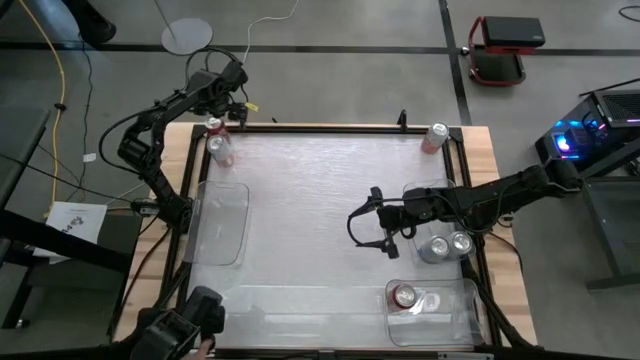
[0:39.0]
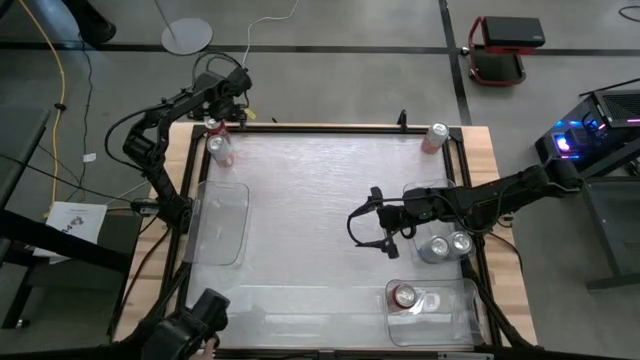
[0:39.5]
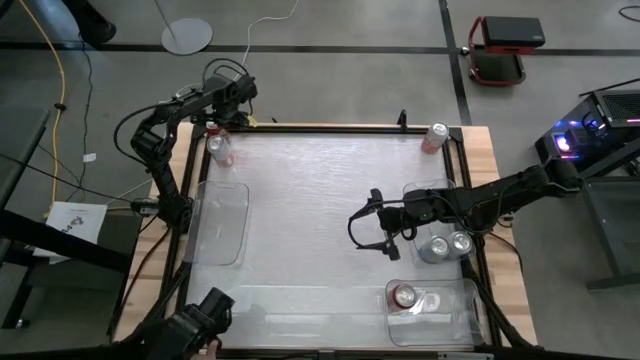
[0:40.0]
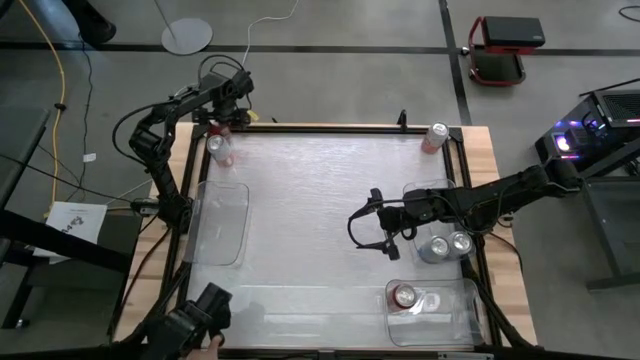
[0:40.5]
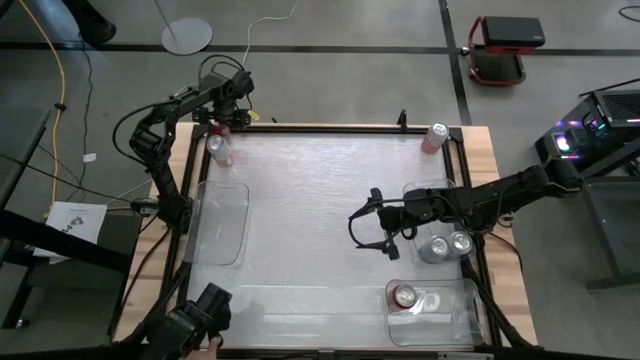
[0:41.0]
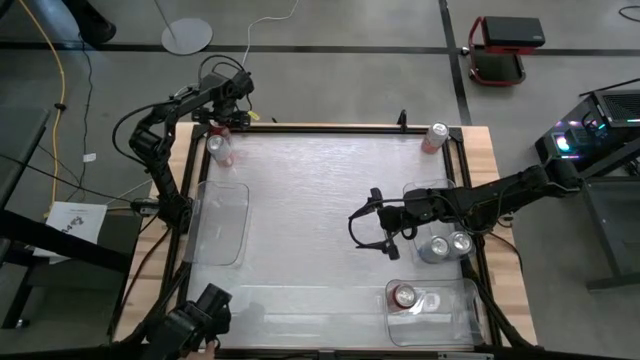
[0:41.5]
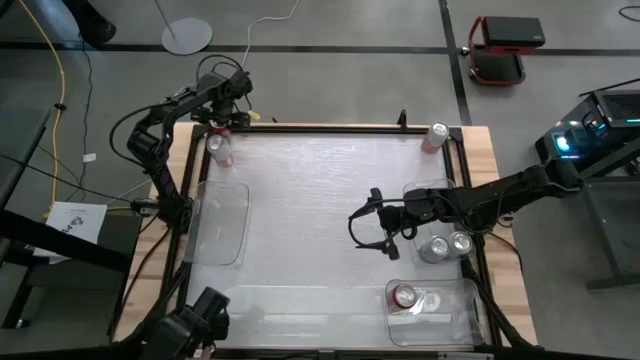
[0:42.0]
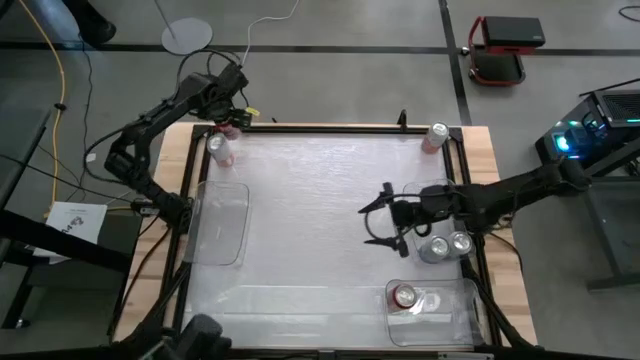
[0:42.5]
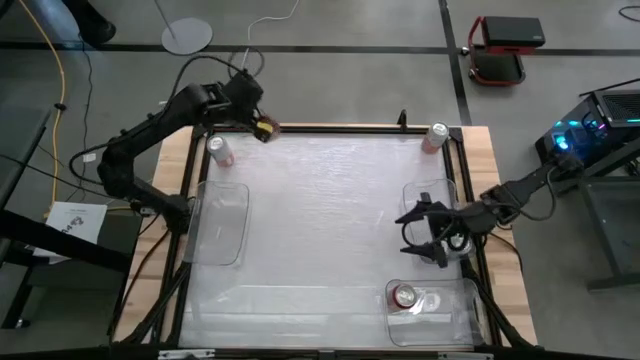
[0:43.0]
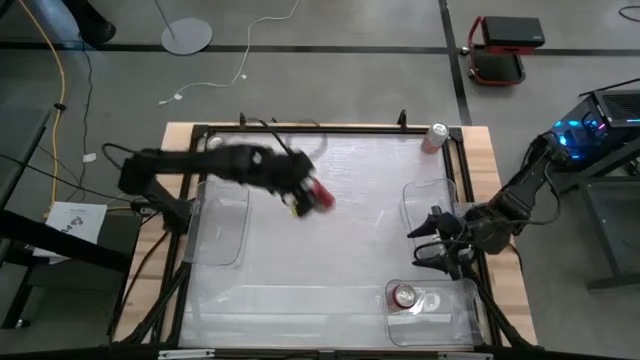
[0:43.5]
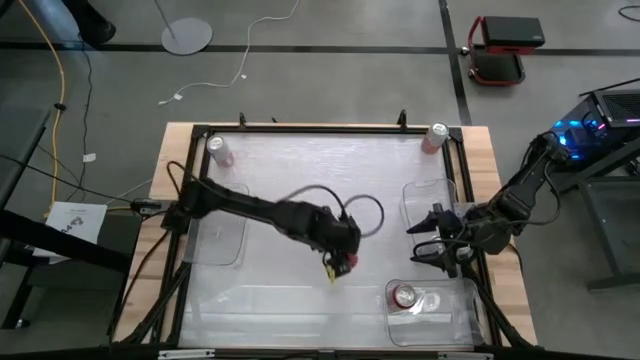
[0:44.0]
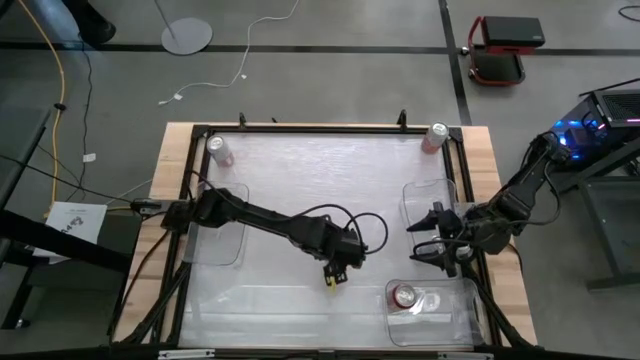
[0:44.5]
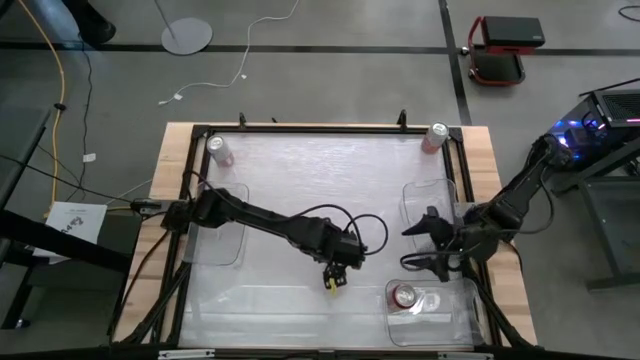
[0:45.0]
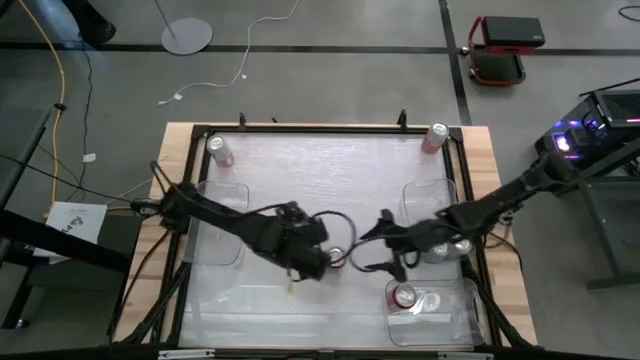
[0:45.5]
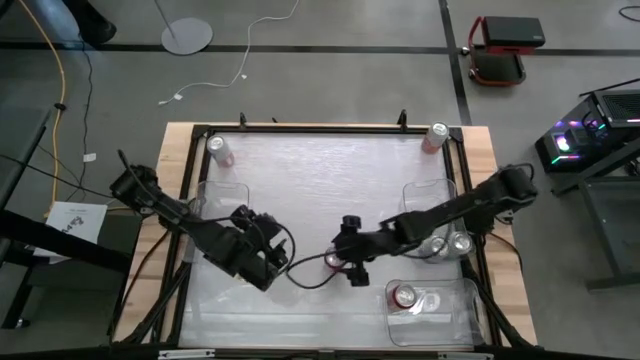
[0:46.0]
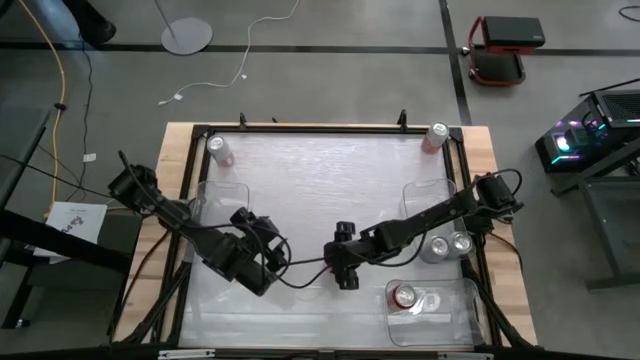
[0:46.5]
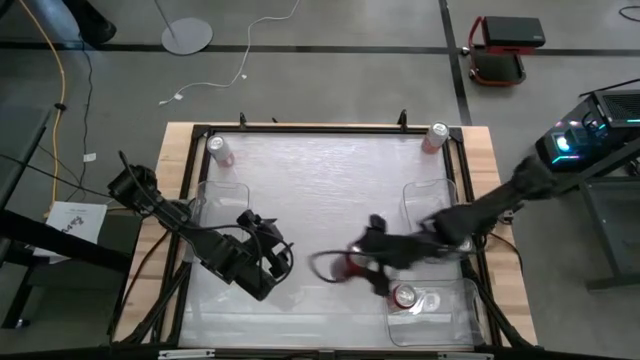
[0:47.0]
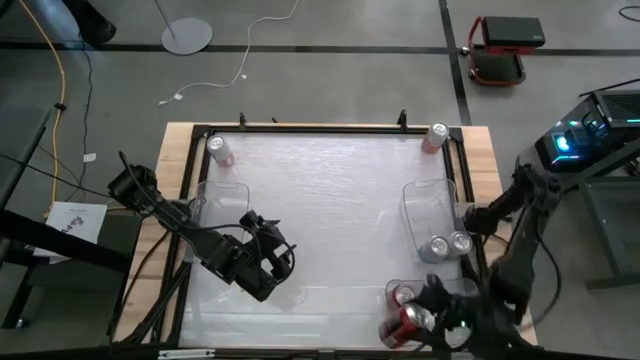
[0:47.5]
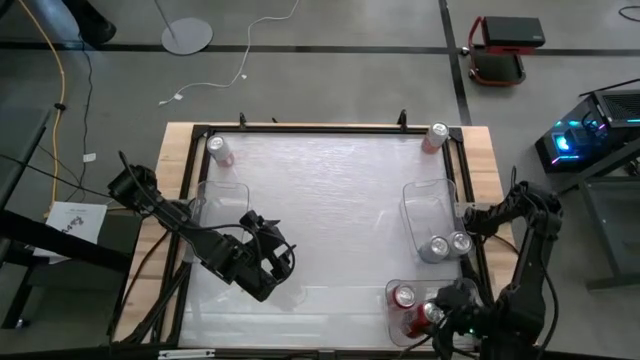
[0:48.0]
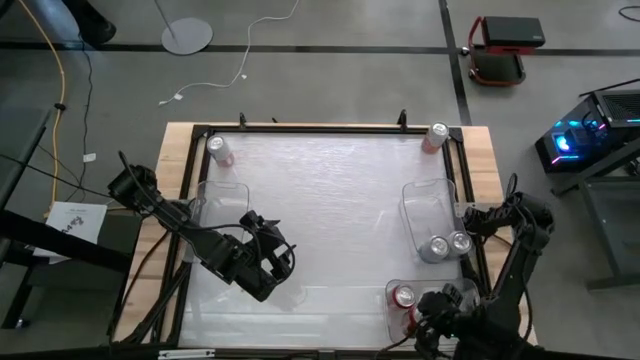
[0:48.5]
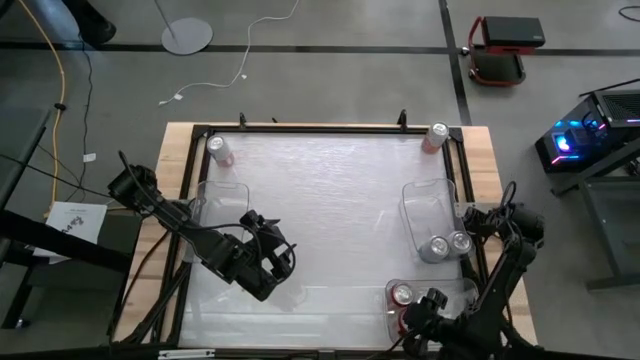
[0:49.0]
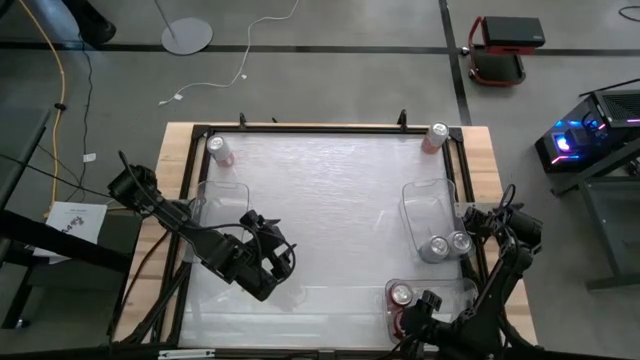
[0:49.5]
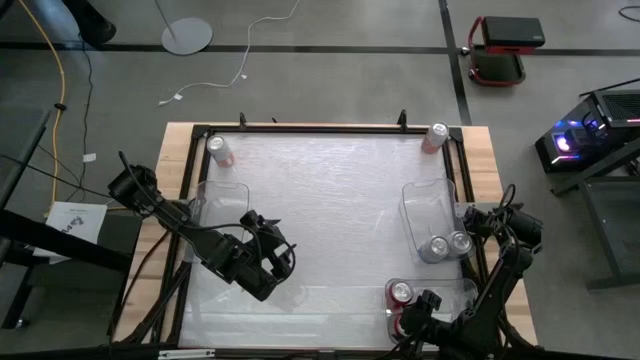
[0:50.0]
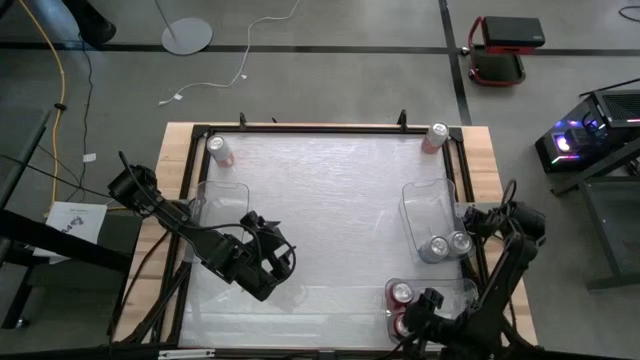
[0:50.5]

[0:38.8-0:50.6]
Task: Sort soda cans
Put the red-black soda can into the bottom transparent bin

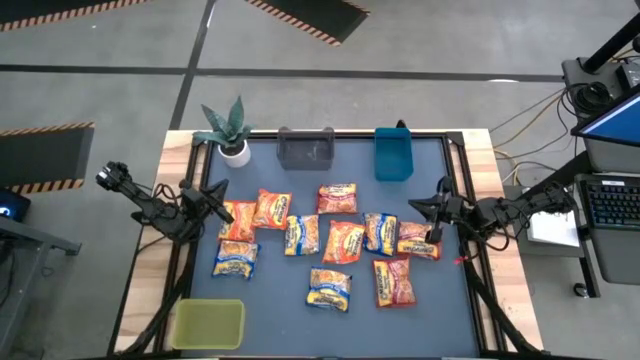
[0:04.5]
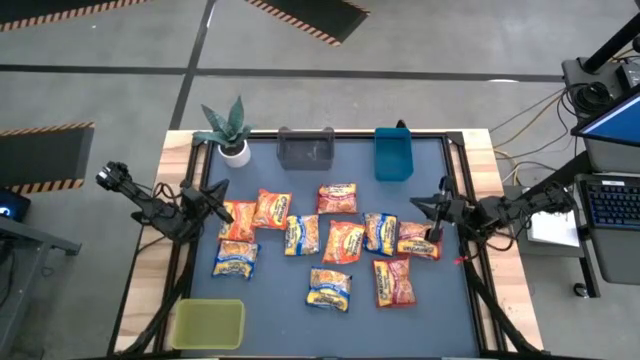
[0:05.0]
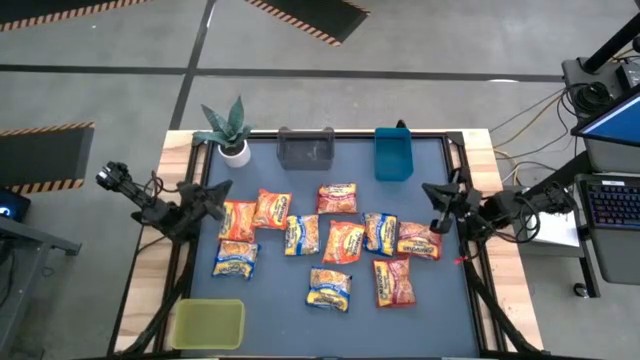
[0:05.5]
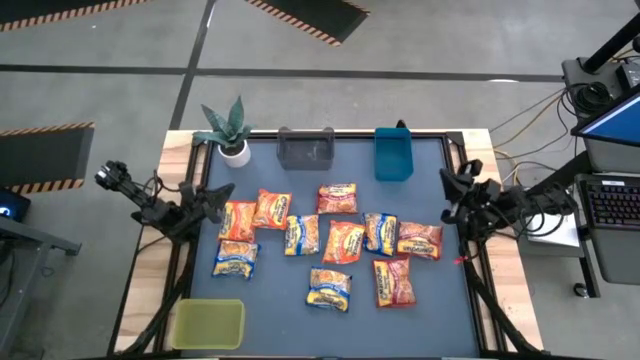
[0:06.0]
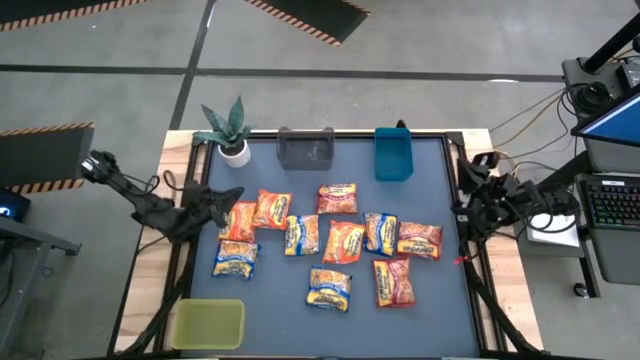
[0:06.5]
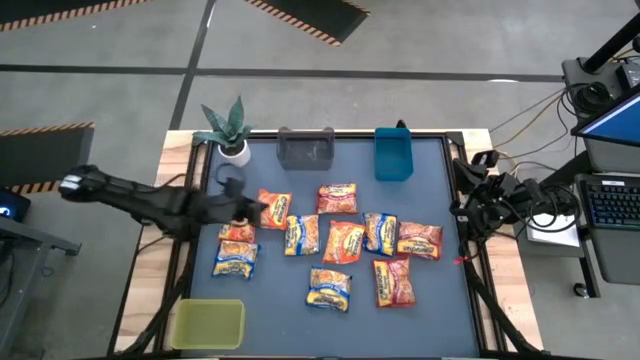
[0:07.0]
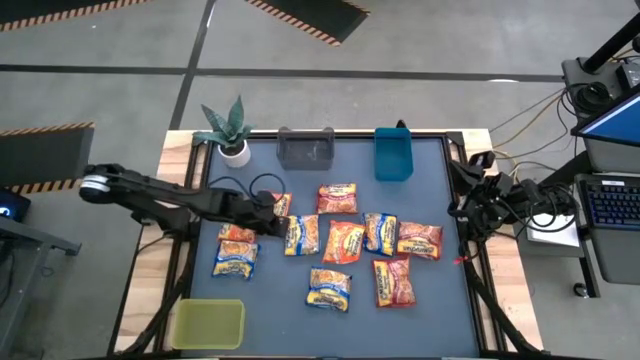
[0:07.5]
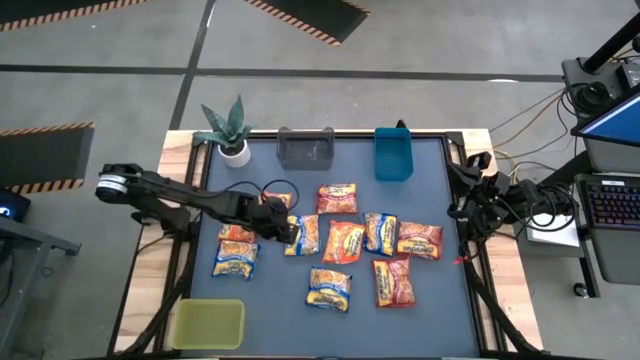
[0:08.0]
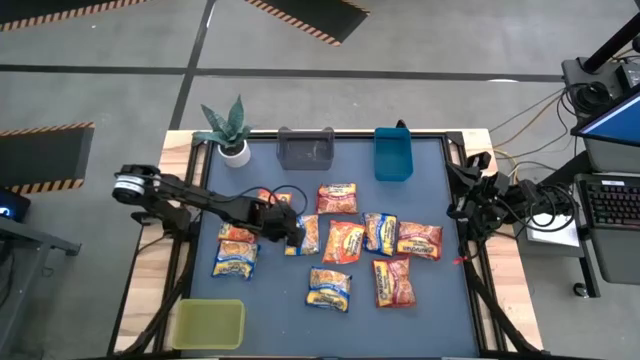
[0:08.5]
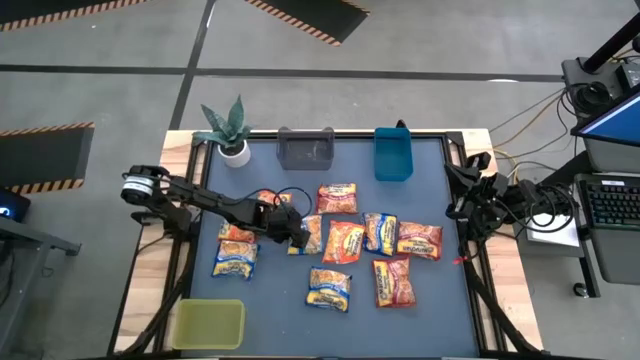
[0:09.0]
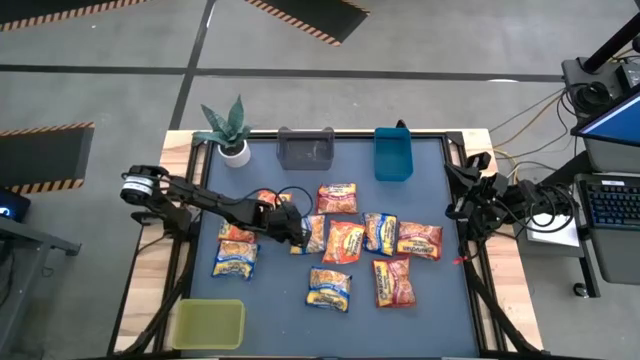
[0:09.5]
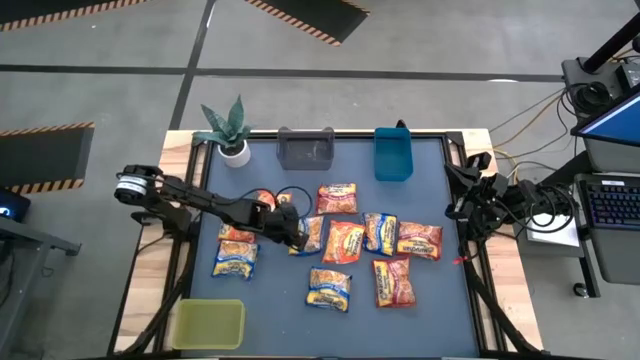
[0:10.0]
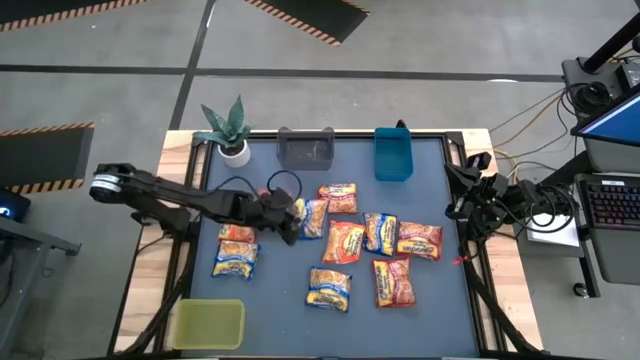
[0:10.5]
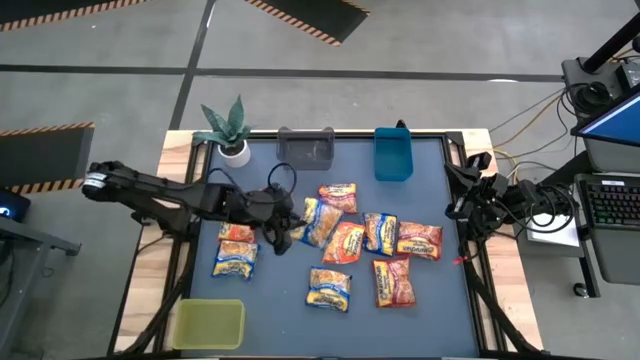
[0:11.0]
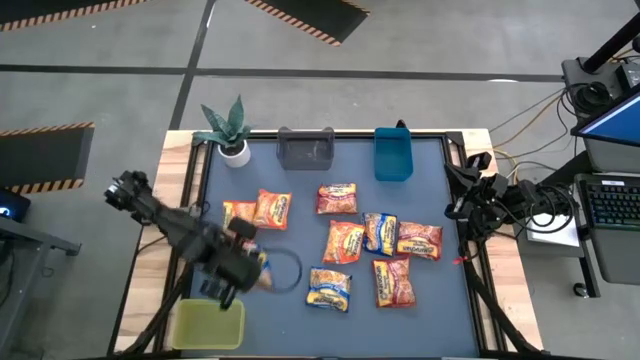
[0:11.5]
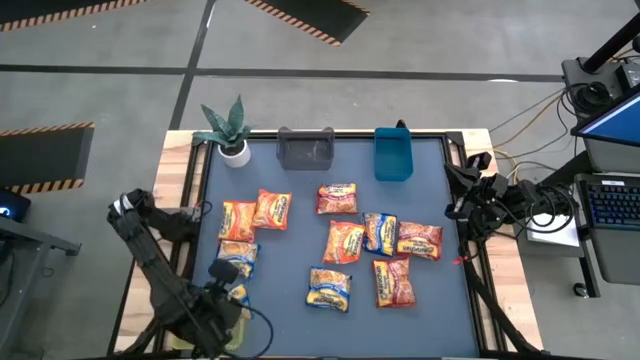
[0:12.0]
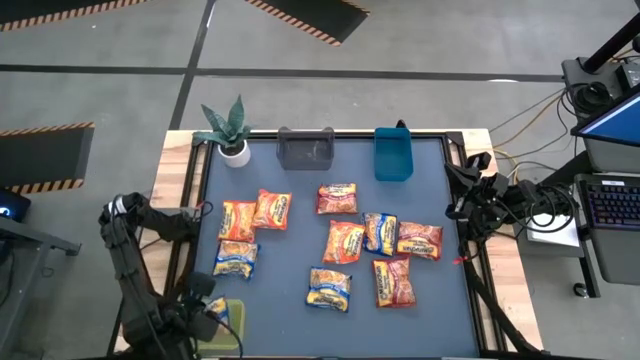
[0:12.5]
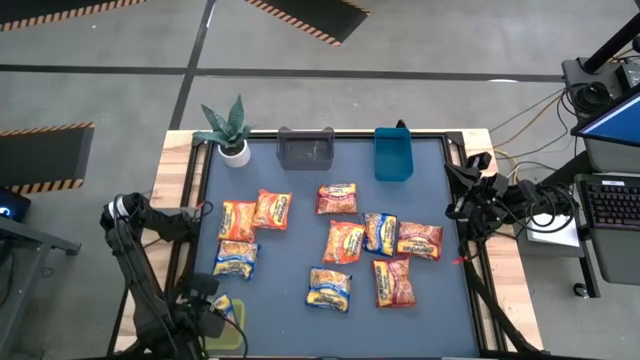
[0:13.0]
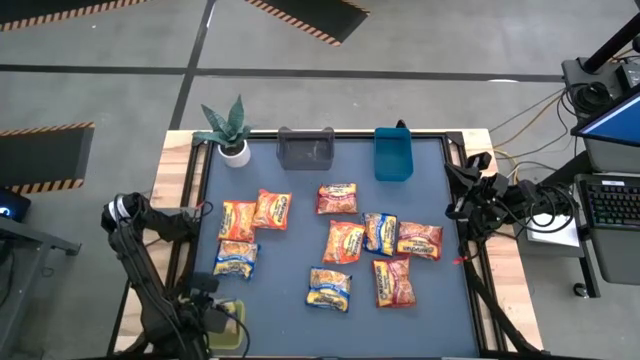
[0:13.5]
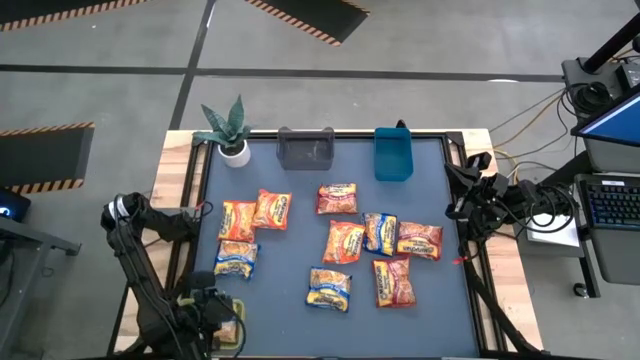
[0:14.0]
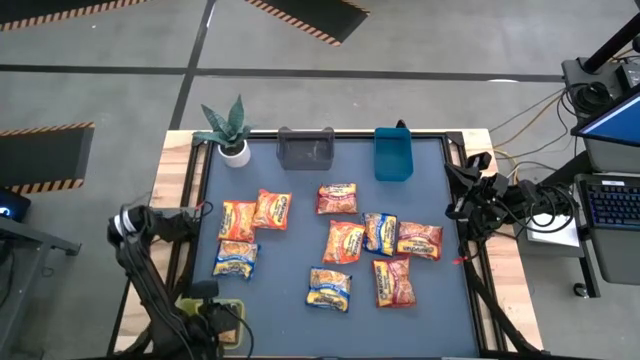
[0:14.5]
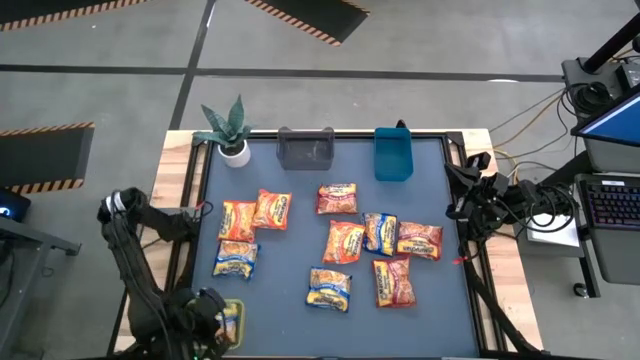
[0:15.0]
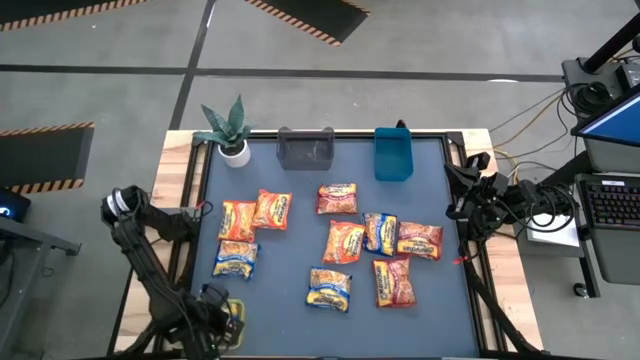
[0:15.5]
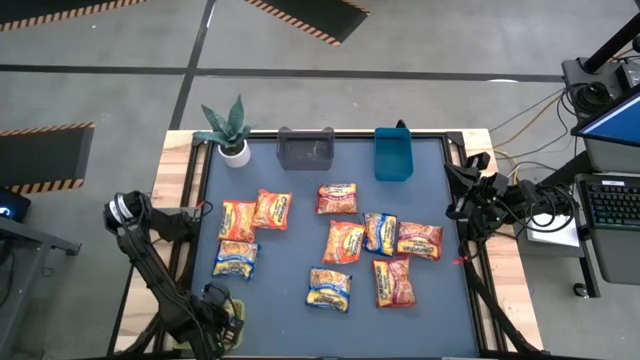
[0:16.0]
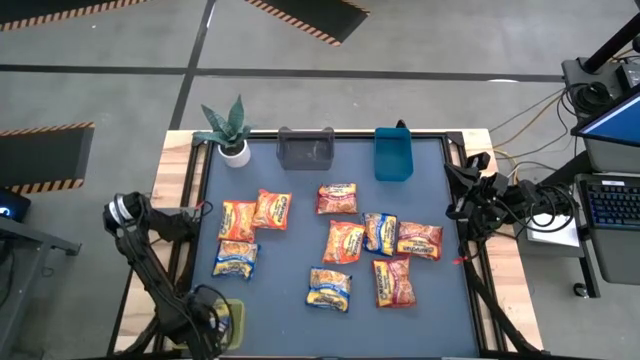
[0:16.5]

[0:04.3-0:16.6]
Task: Sort Maruchan noodles
Put the blue noodle pack into the yellow bin
